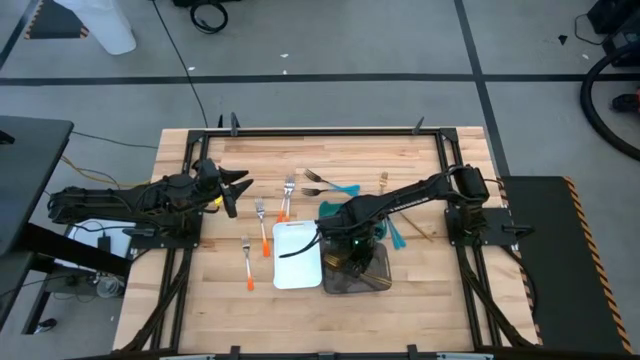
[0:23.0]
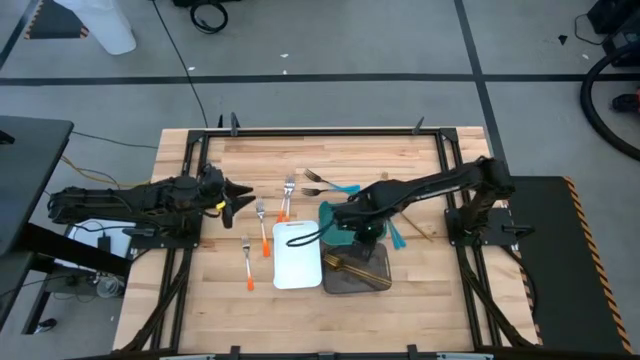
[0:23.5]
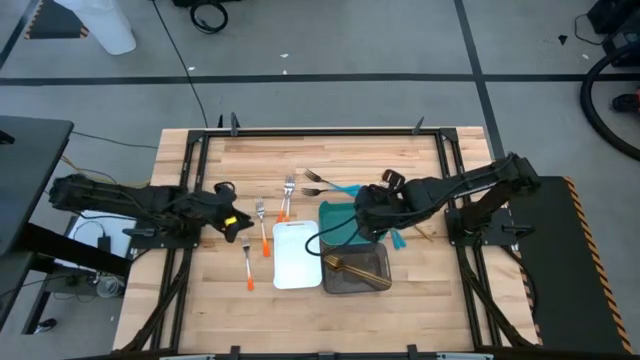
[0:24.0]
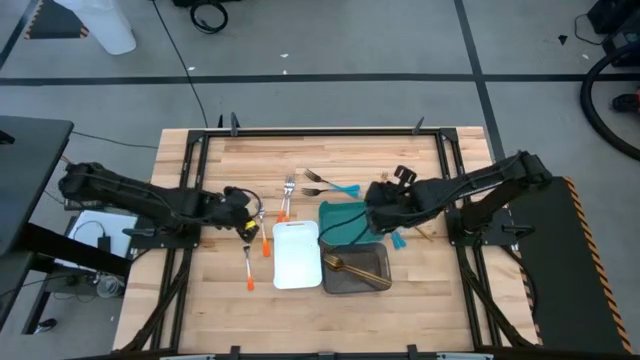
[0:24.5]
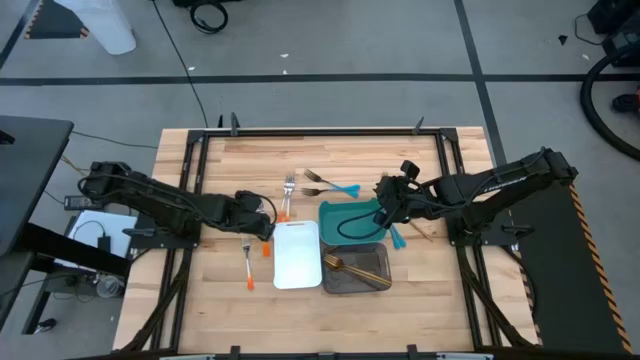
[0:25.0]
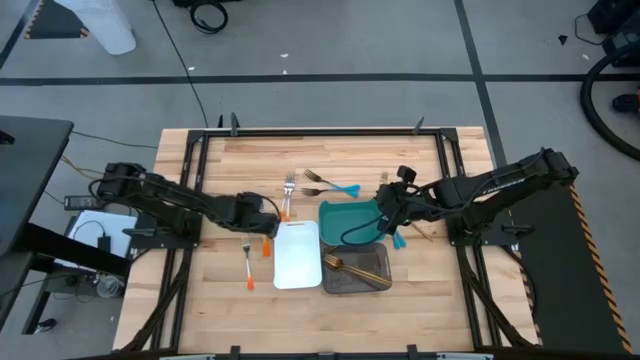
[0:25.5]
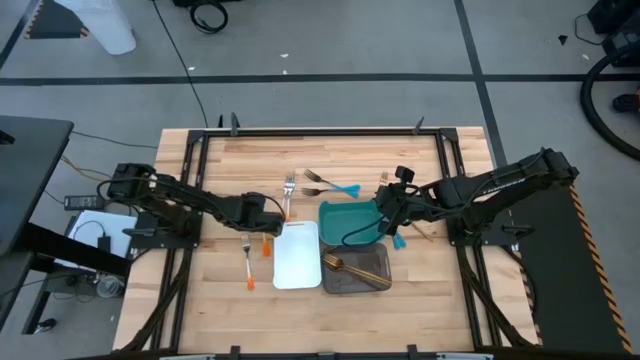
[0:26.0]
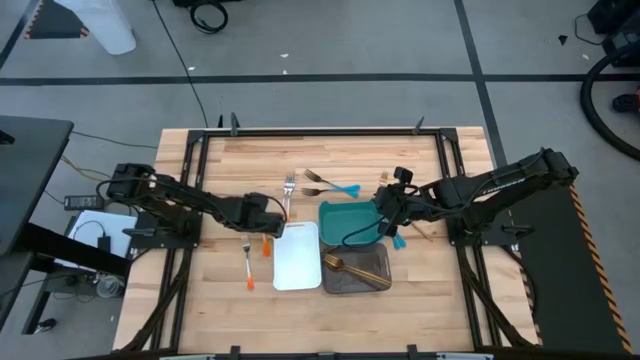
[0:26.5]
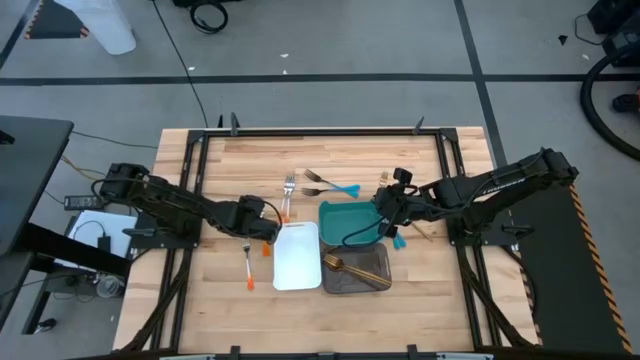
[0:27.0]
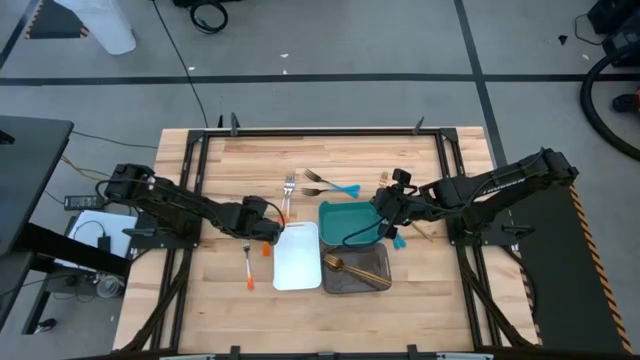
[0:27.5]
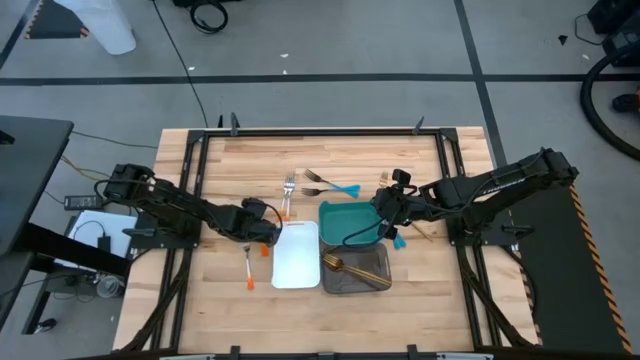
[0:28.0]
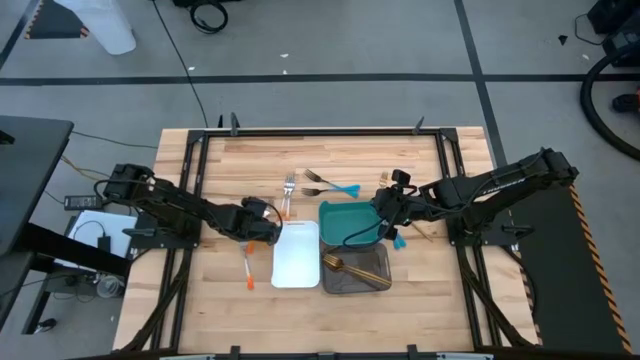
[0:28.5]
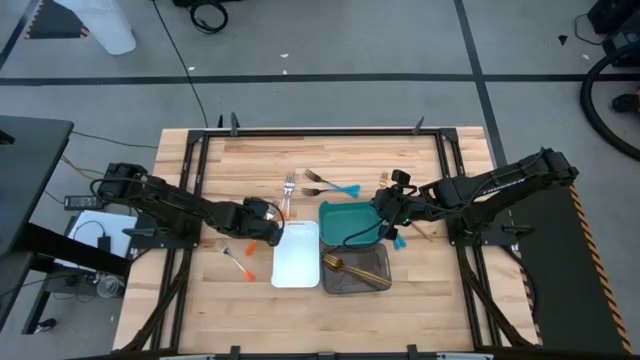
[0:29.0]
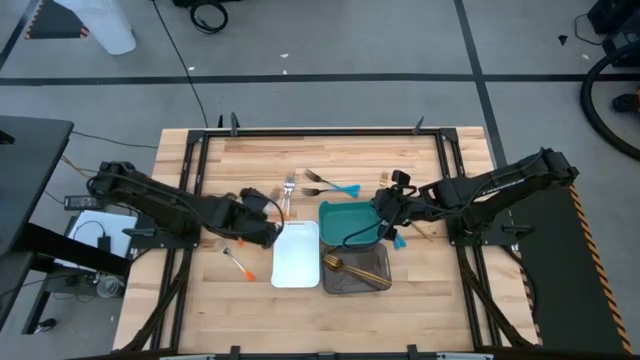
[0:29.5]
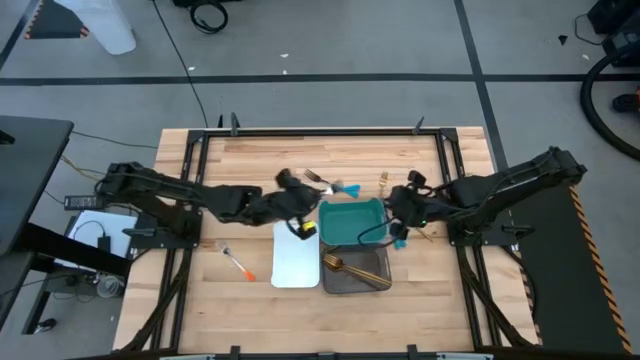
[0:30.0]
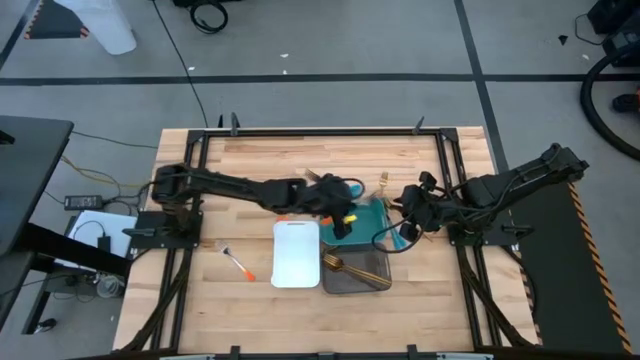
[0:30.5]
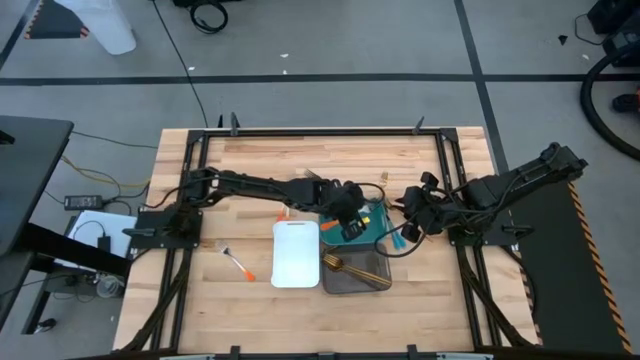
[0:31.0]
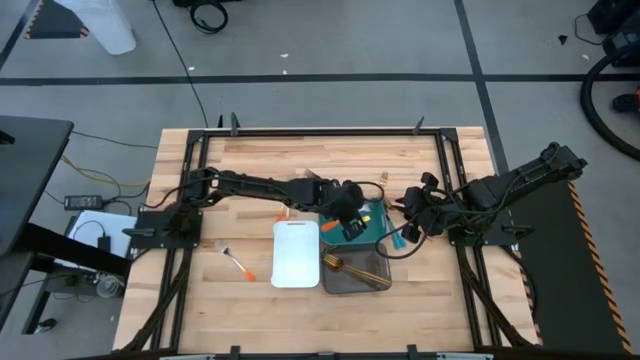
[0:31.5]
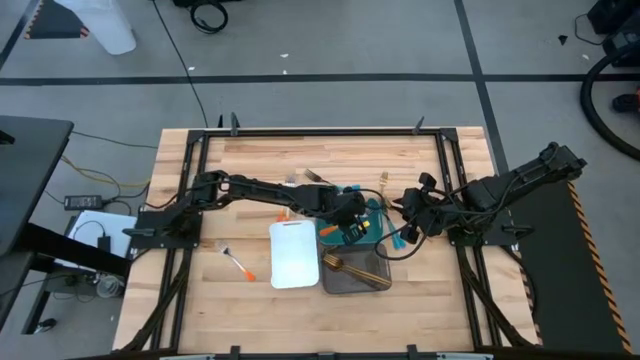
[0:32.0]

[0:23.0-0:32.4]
Task: Sort silverware by color (type)
Put the white-orange fork into the green bin

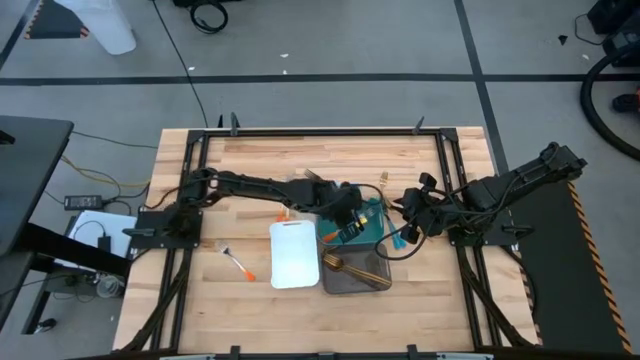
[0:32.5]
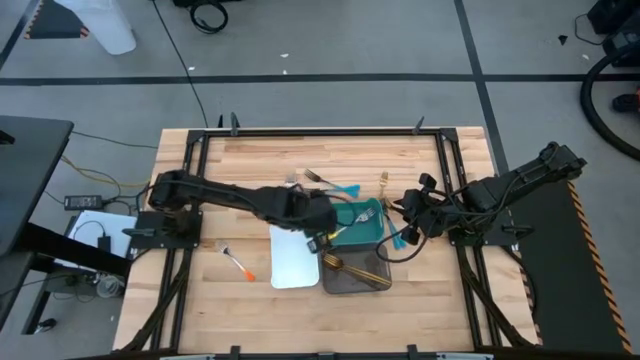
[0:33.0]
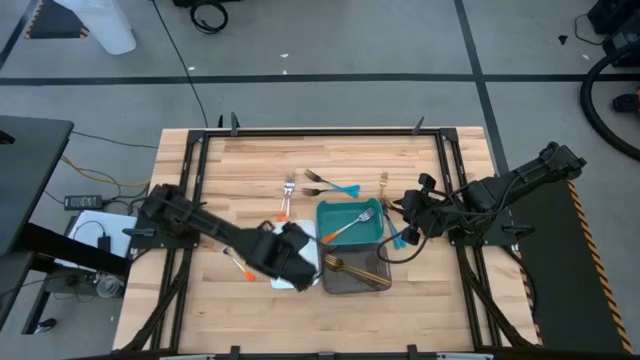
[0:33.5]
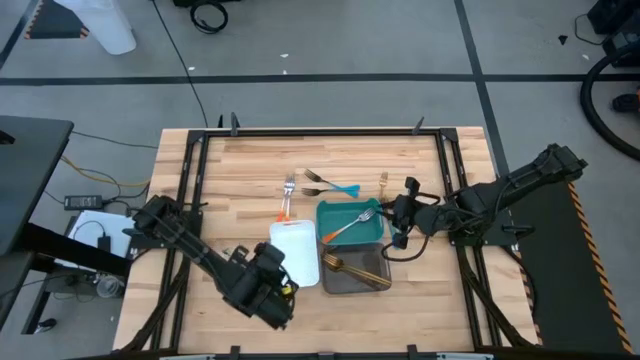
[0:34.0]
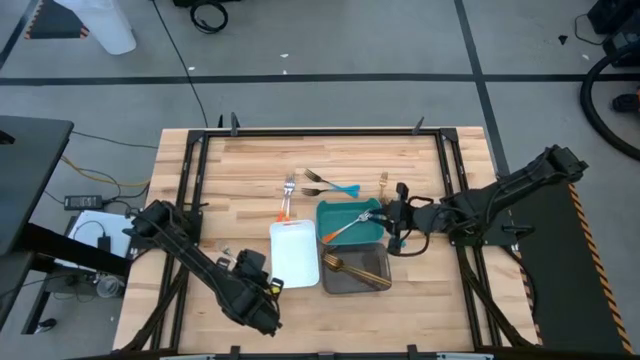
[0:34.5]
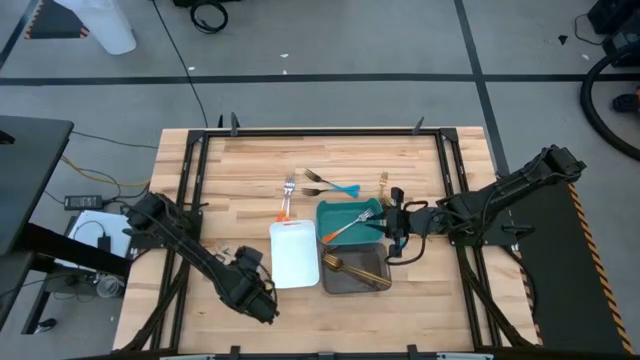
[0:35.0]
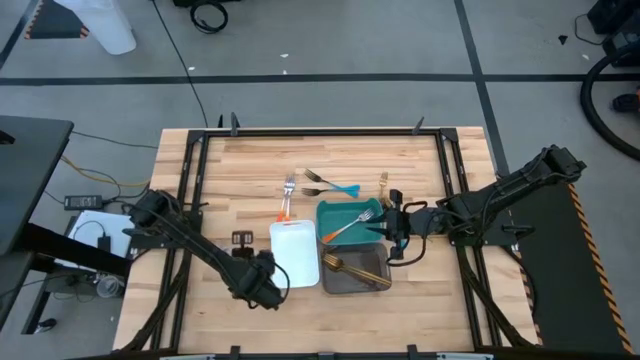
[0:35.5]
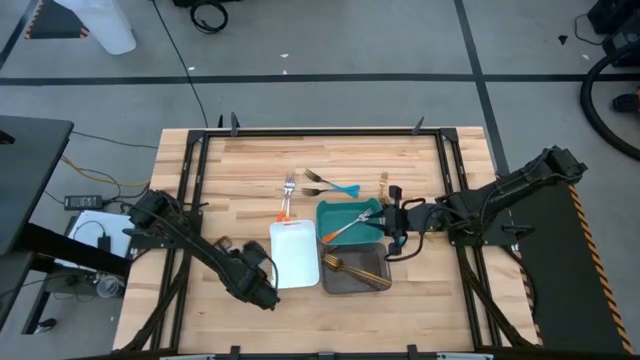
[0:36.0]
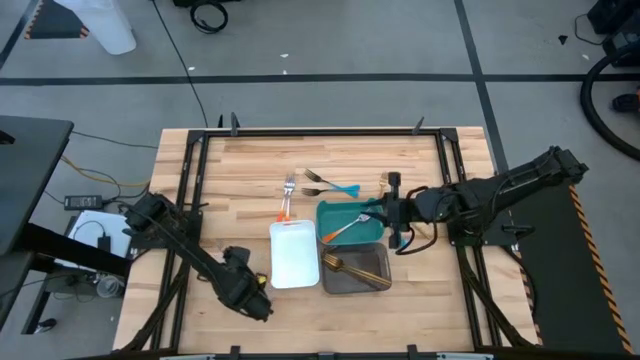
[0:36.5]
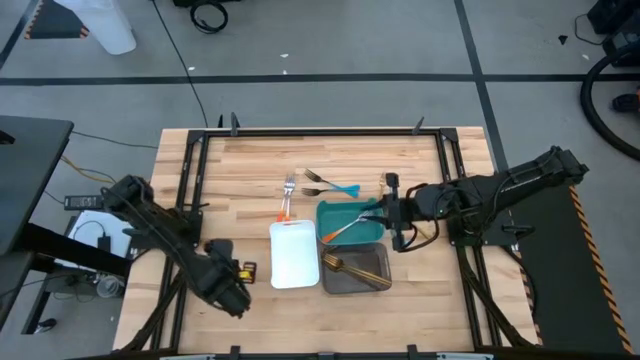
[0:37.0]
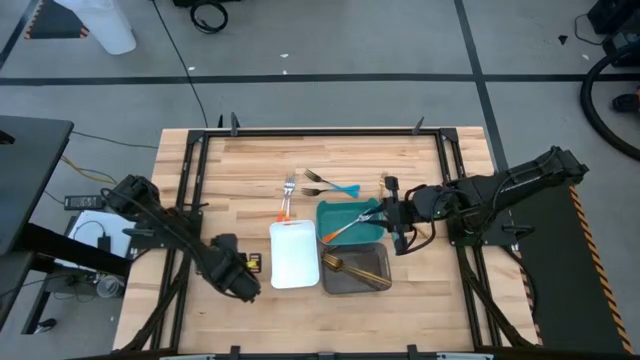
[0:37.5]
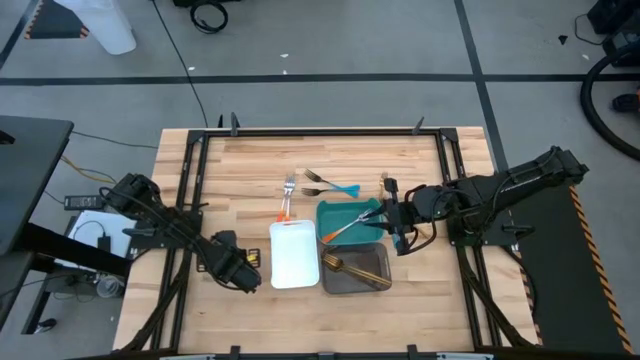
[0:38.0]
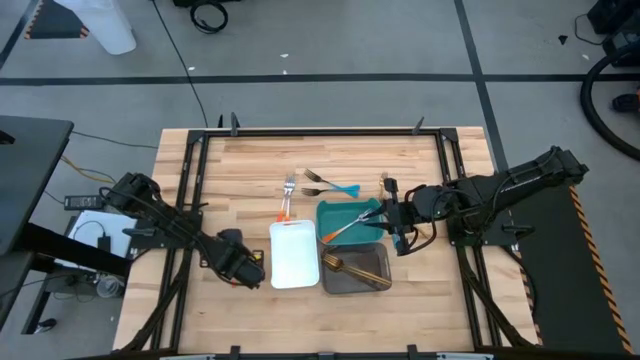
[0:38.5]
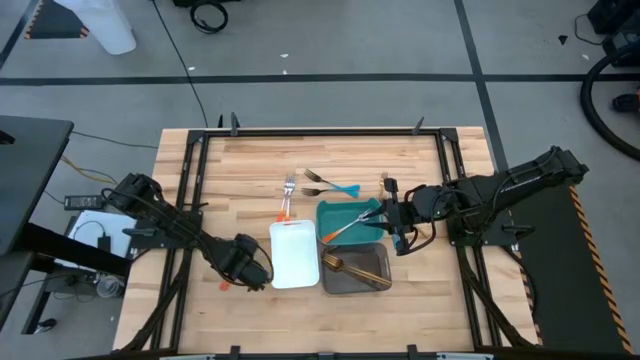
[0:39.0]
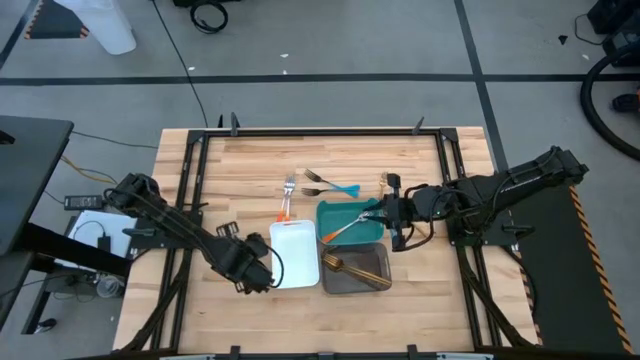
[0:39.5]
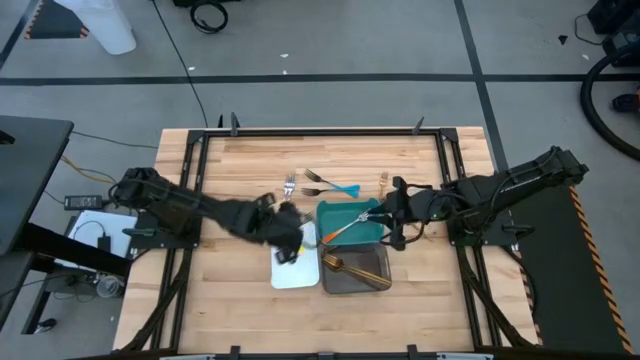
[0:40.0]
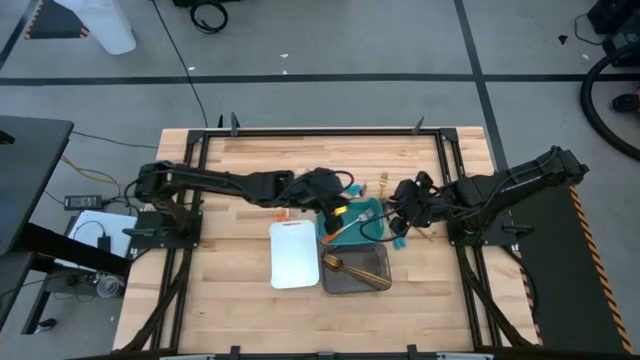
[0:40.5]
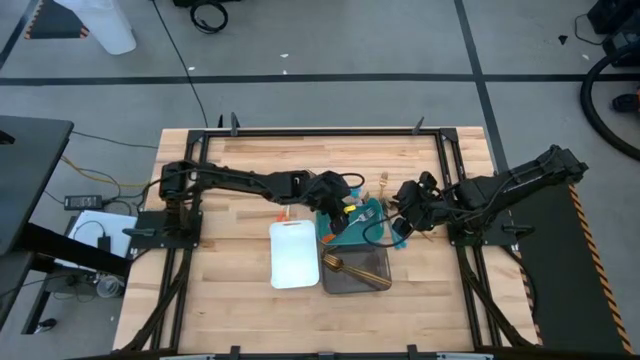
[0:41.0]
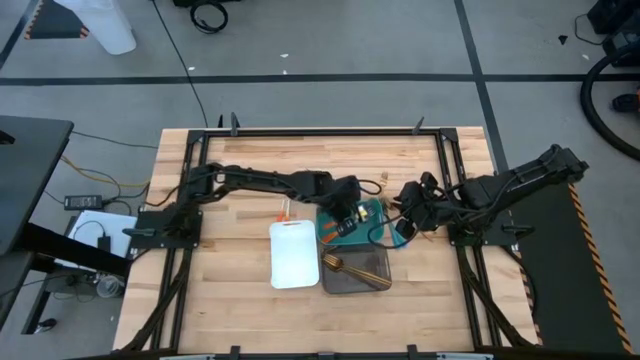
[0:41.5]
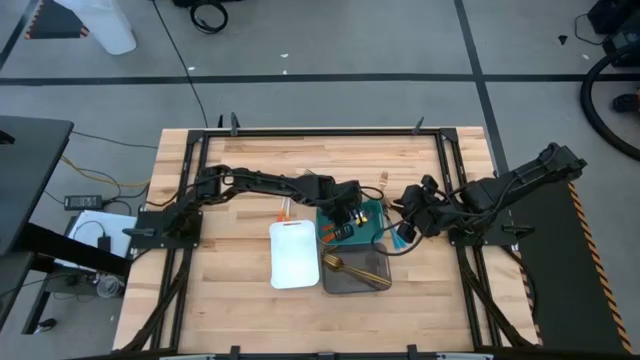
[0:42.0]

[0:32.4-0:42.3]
Put the white-orange fork into the green bin
